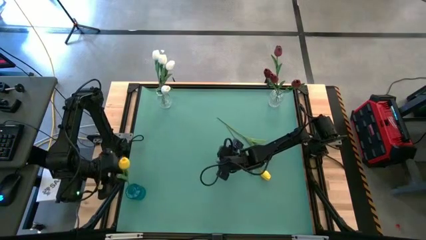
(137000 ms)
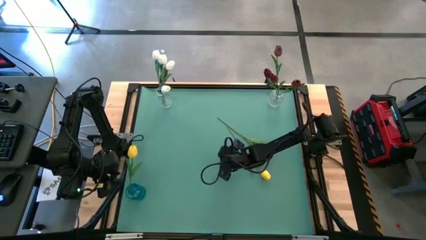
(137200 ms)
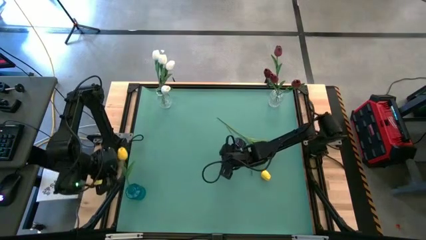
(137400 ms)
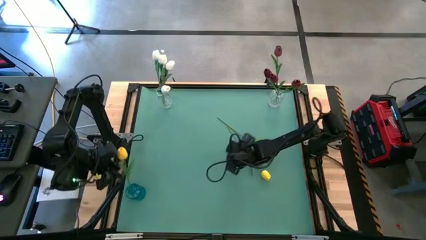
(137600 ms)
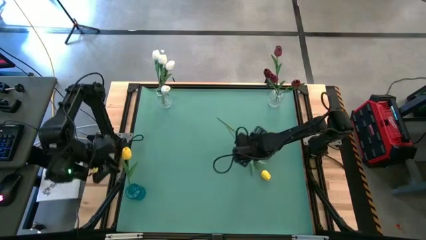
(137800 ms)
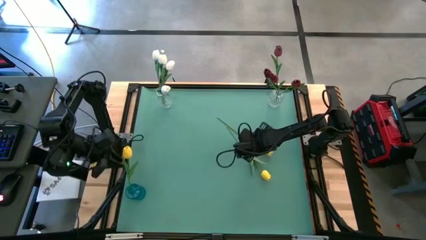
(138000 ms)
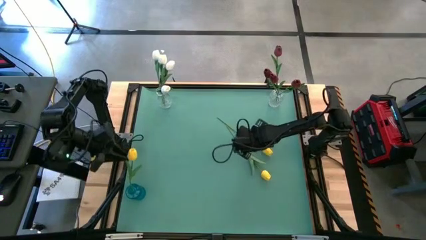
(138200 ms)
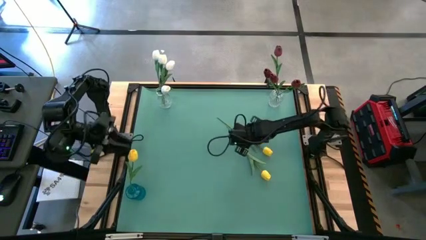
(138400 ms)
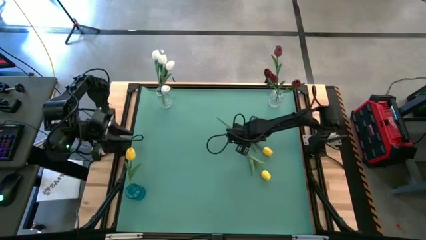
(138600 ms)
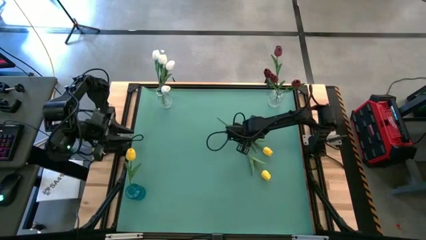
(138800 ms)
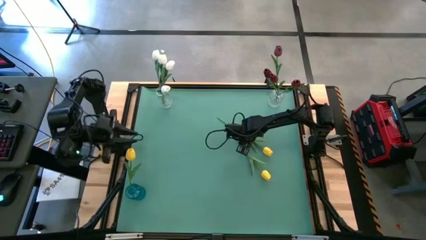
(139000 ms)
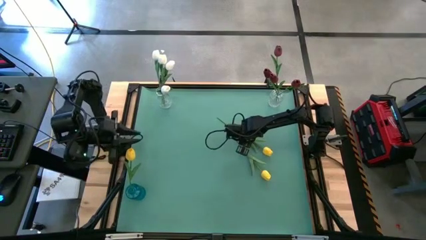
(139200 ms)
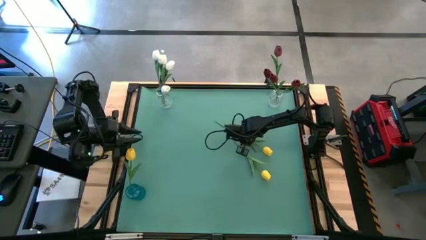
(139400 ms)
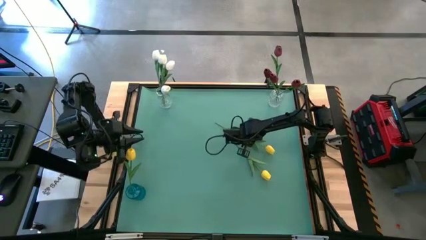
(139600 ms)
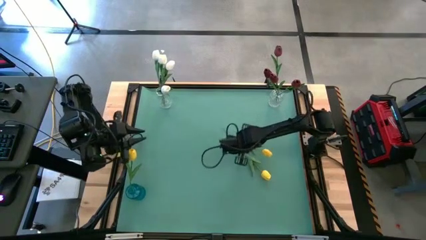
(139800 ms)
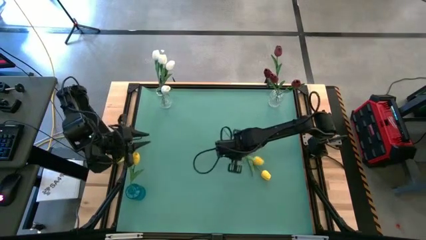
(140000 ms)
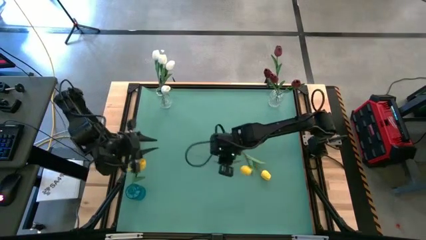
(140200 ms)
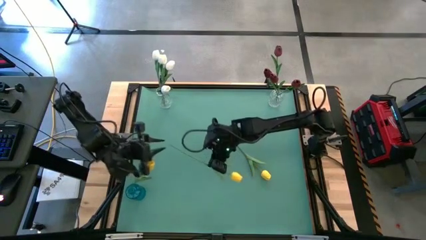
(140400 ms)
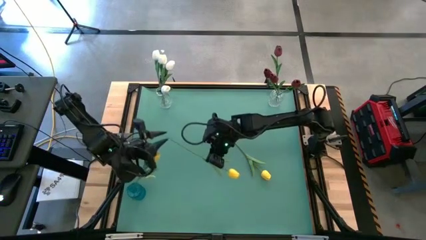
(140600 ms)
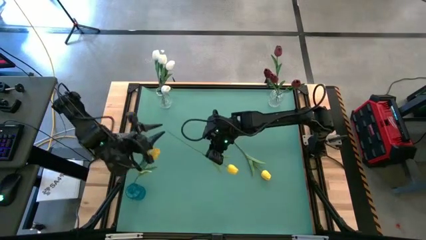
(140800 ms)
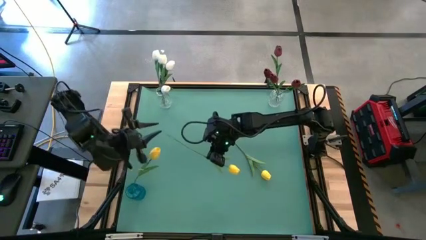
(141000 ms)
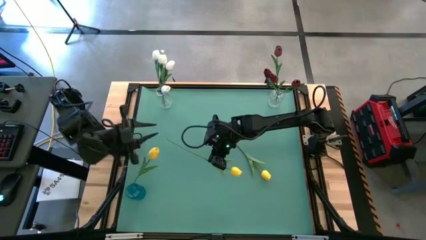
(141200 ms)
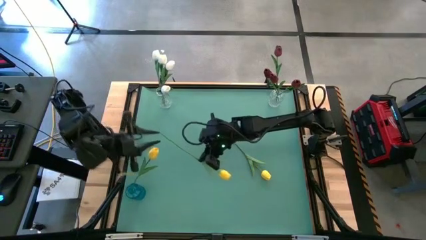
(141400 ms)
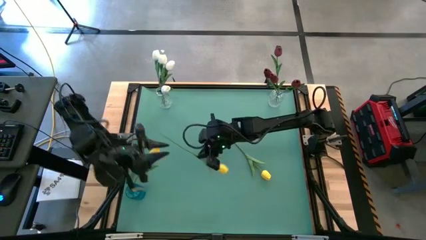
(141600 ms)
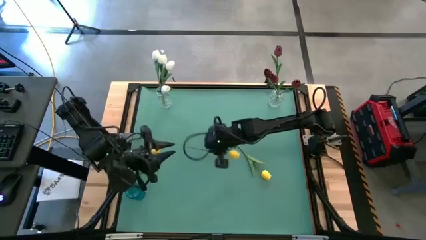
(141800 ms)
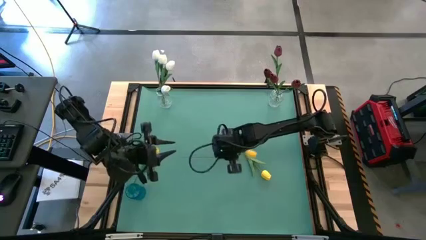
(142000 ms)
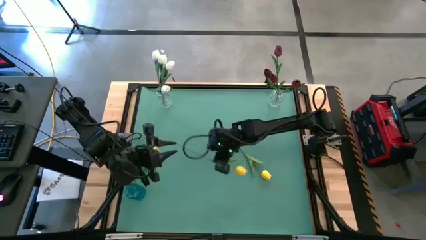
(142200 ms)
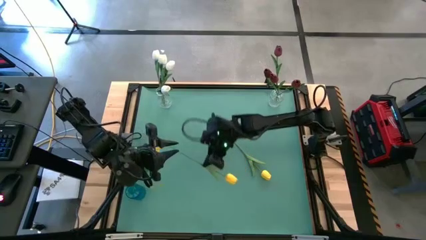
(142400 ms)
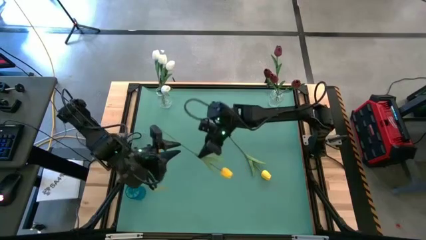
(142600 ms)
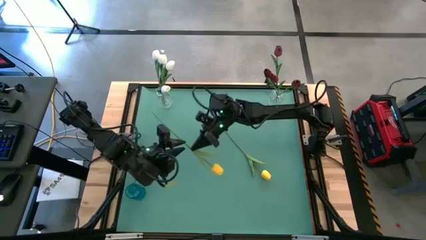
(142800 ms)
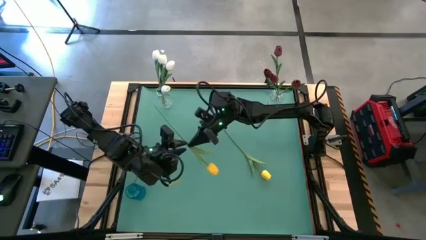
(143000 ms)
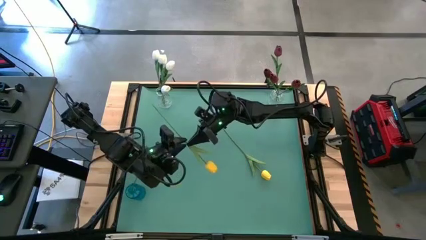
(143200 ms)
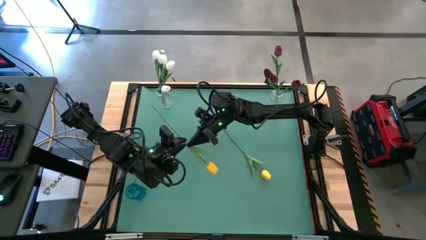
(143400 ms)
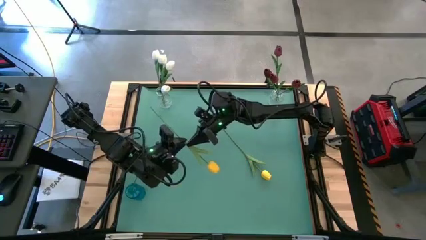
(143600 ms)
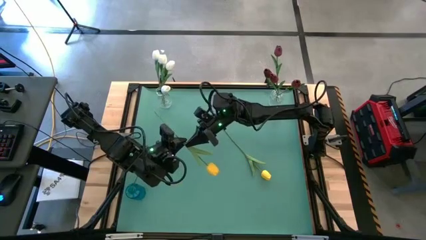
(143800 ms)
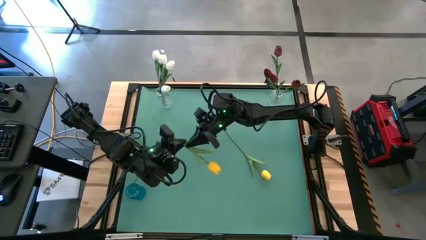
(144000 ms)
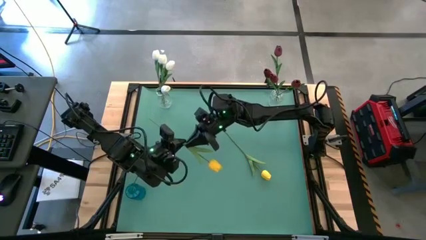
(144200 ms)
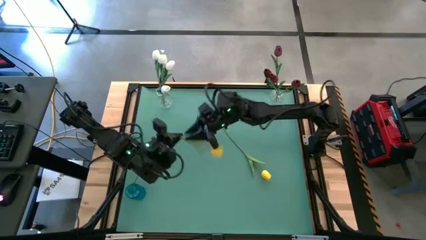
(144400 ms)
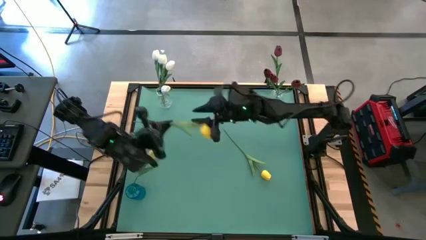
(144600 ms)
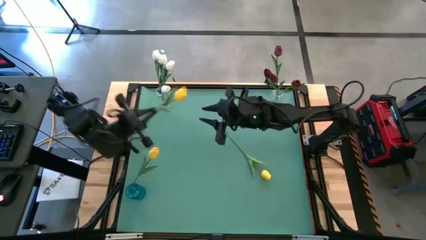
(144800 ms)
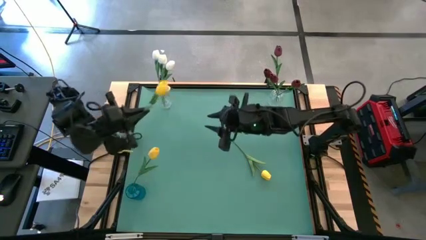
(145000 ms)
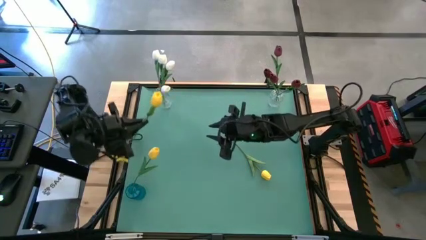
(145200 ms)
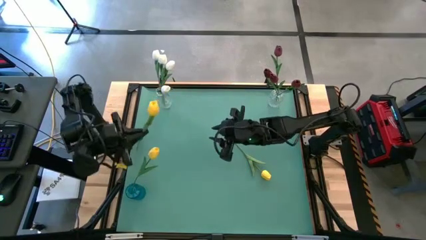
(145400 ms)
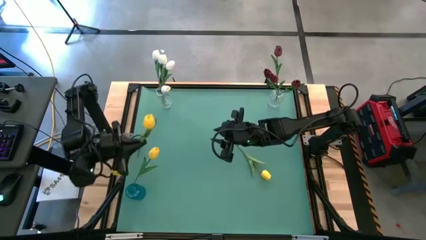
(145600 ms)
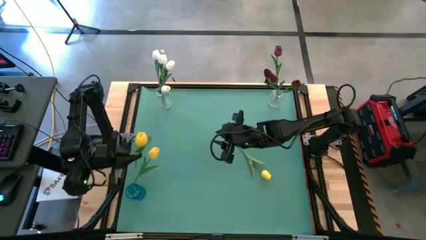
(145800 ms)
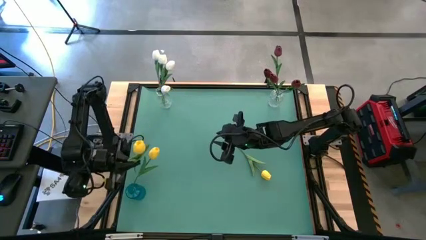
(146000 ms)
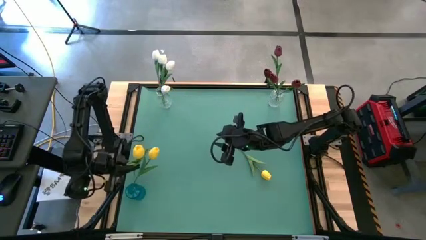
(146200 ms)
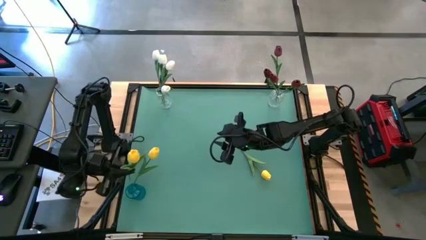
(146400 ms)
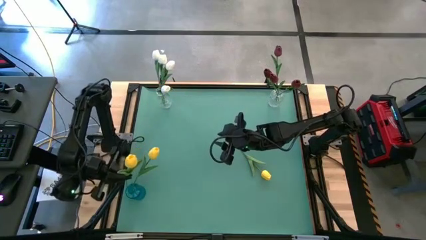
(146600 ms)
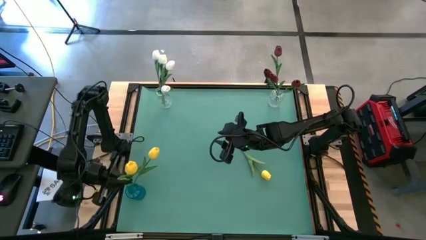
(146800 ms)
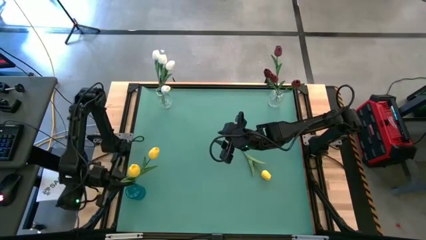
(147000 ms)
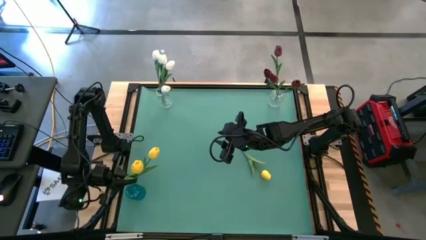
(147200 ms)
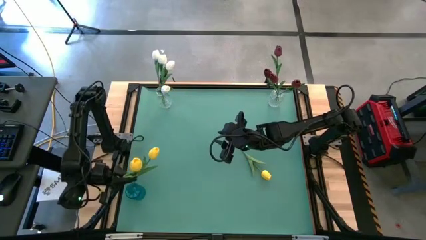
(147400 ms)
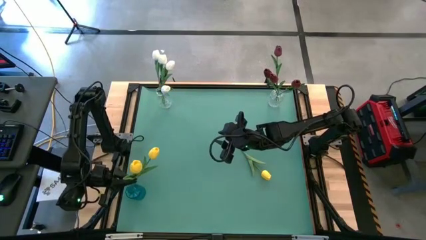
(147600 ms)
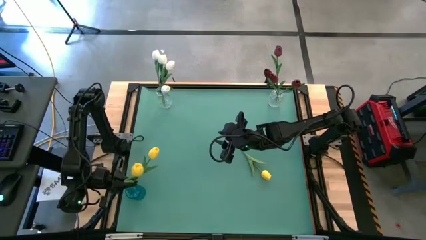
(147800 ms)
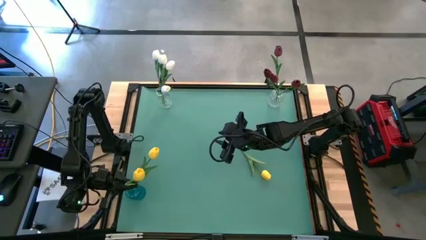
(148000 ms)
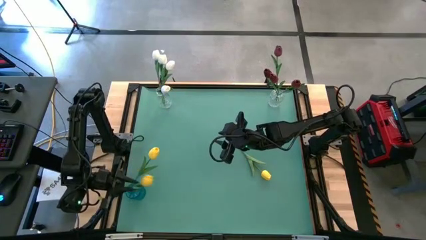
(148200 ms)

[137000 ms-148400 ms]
Task: Sort flowers into vase by color
Put the yellow flower into the blue vase

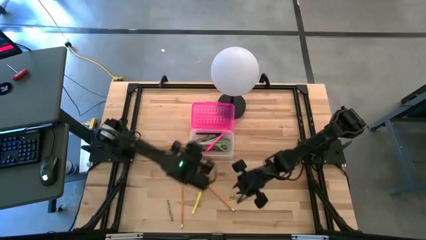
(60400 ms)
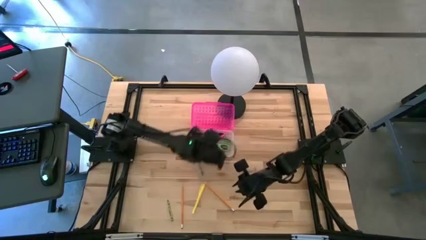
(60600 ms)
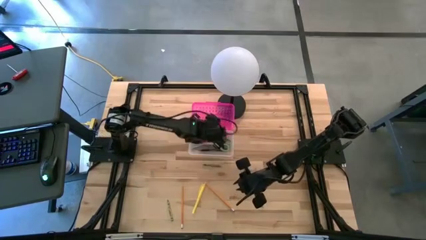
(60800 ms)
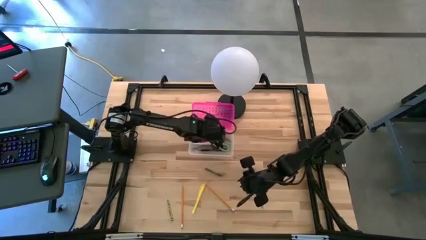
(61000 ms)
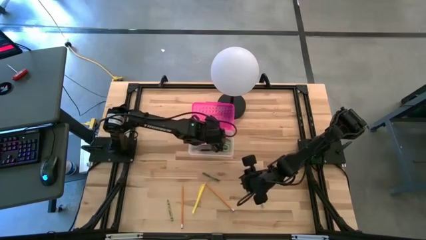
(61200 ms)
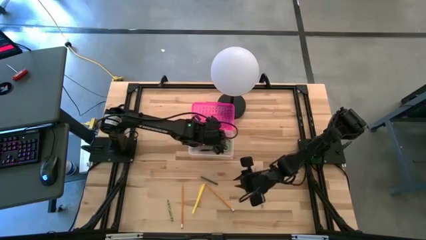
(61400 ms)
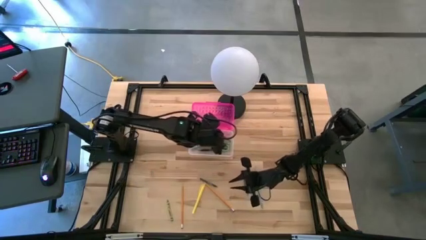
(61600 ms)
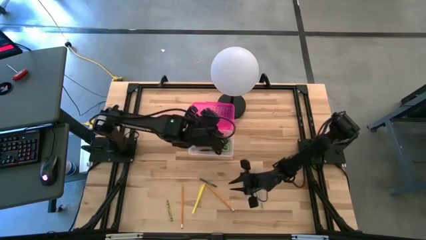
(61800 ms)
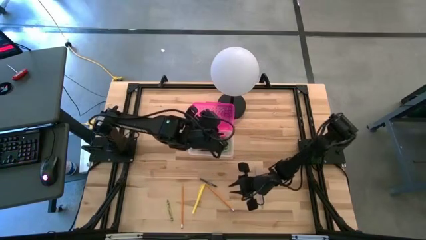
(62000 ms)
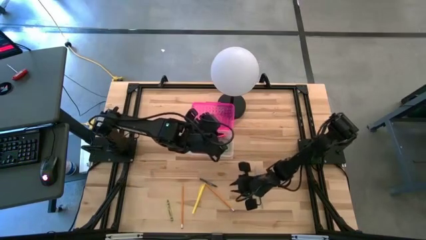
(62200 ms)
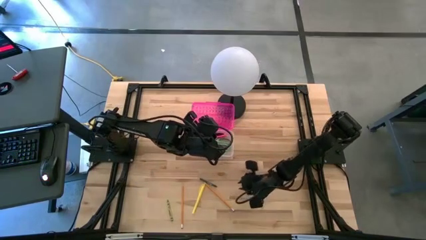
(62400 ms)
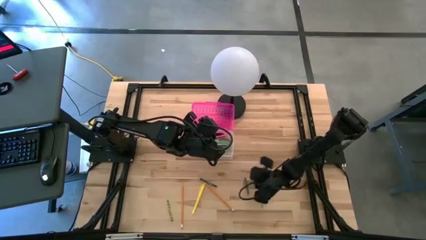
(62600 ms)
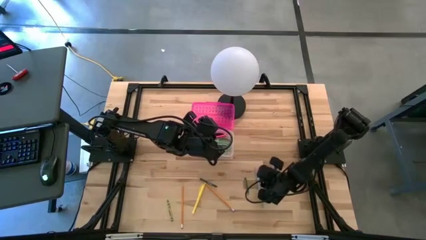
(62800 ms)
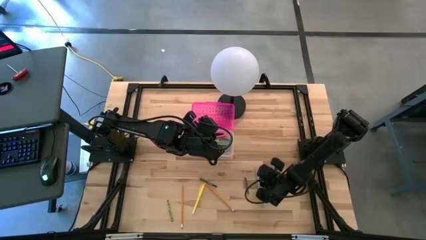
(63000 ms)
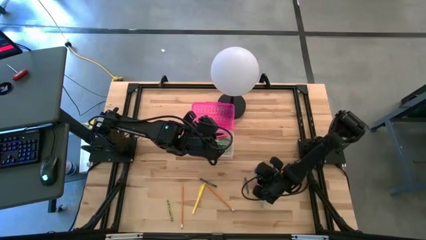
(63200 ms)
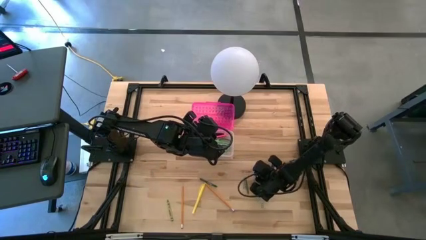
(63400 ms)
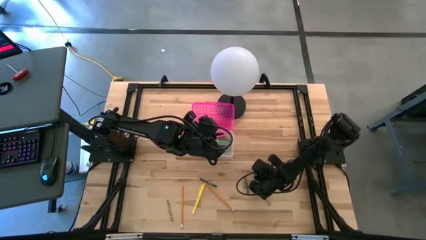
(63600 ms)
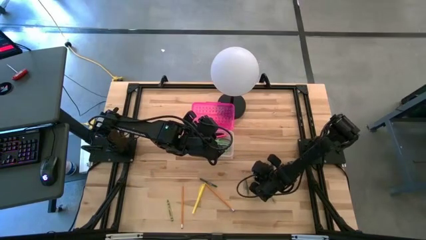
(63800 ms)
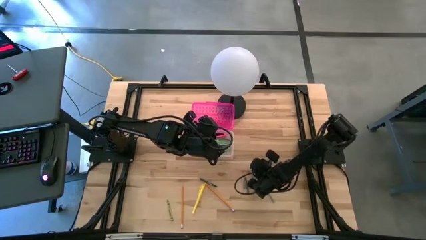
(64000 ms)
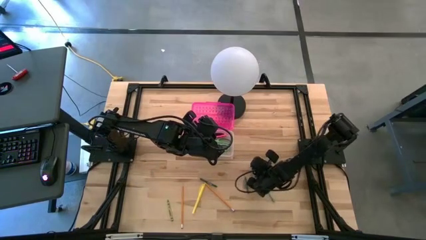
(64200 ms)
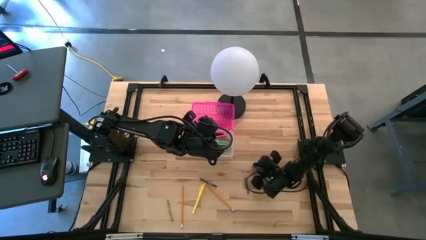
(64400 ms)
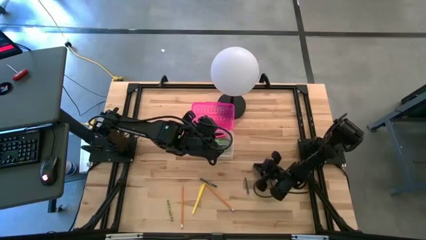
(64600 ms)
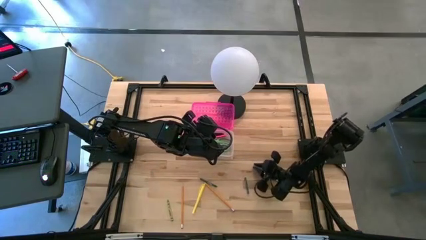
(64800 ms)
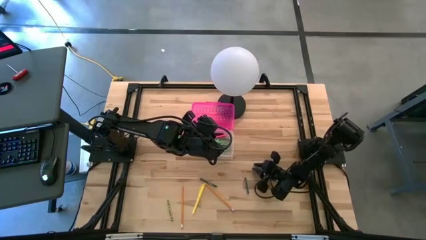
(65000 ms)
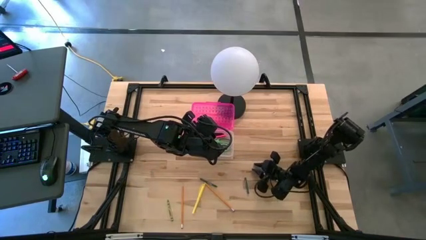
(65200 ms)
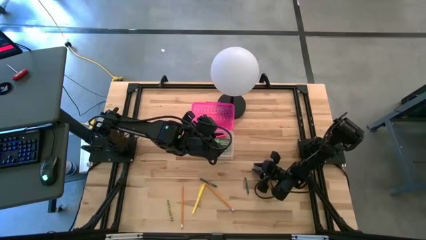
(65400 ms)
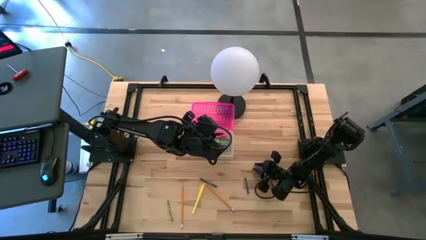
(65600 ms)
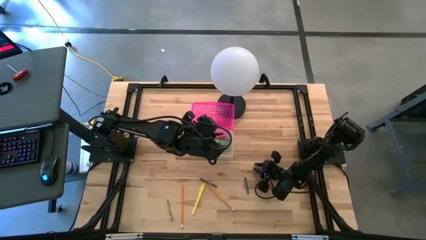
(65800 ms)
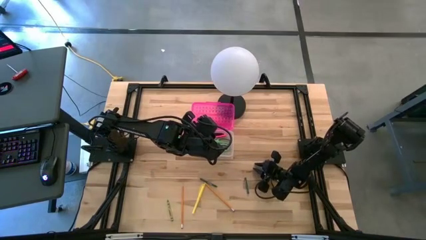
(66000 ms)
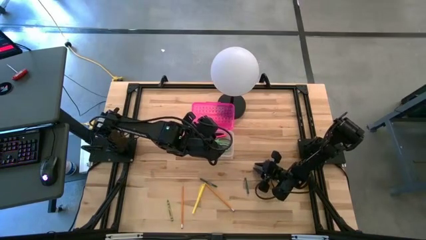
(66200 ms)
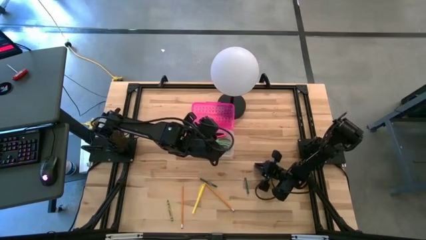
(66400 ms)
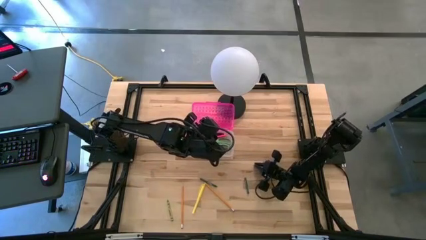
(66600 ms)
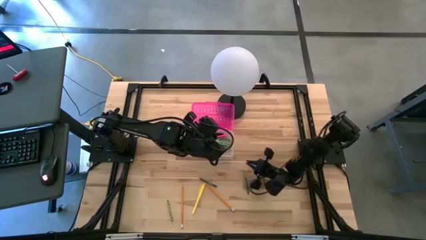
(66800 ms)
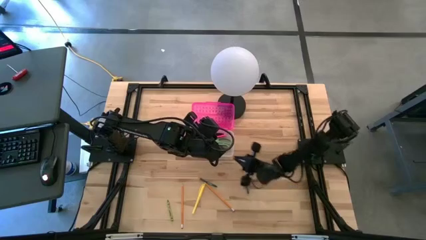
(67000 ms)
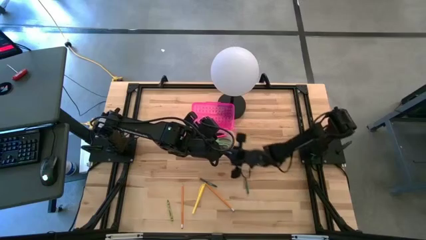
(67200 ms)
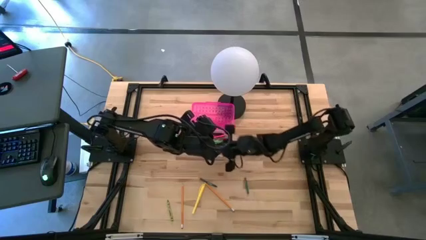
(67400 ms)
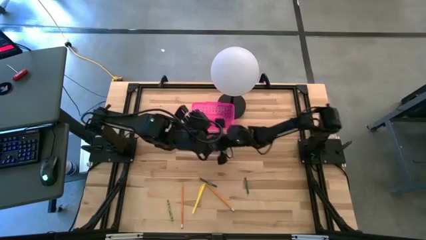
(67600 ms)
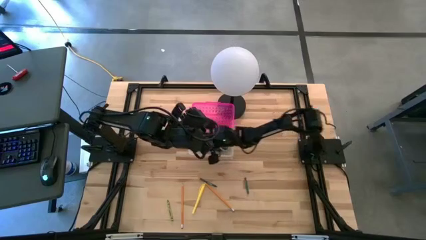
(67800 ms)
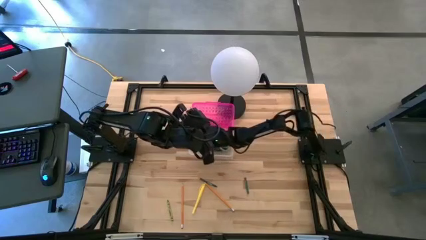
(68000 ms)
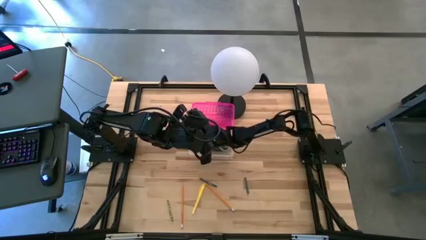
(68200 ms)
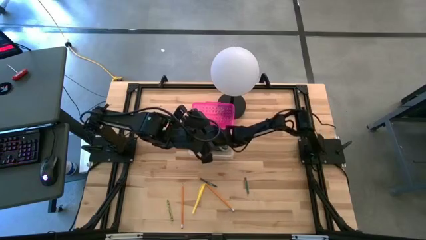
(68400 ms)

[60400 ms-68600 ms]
Task: Pick & place school supplies into a supply box
Put the blue pencil into the pink supply box
